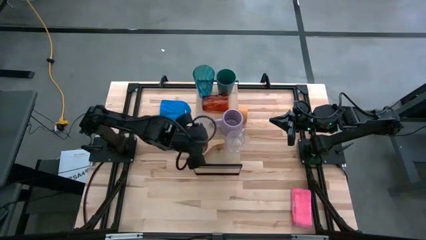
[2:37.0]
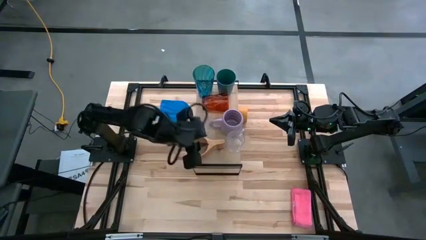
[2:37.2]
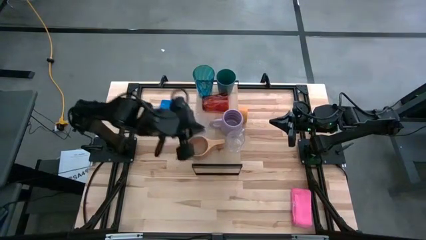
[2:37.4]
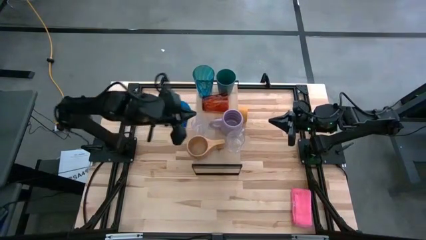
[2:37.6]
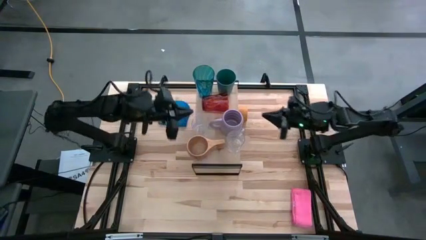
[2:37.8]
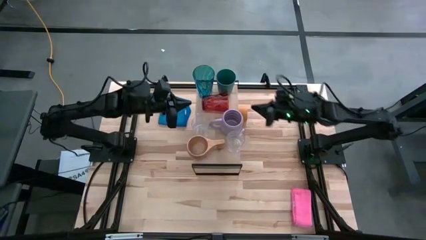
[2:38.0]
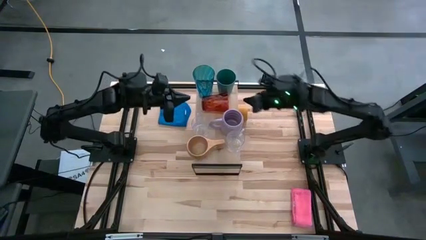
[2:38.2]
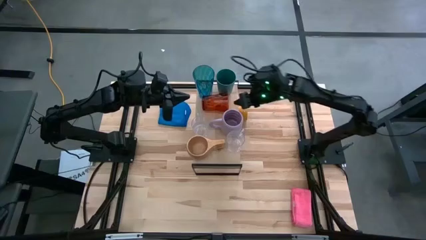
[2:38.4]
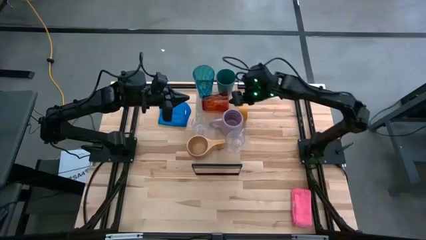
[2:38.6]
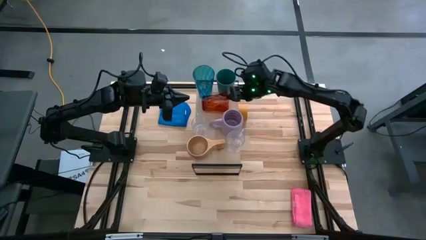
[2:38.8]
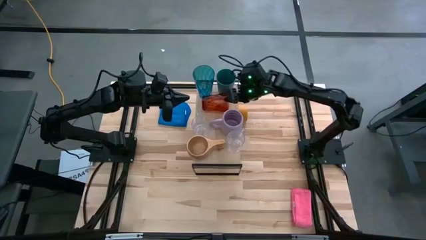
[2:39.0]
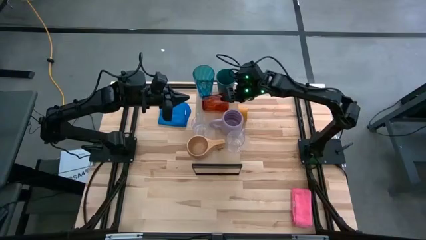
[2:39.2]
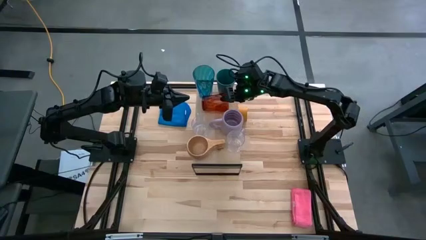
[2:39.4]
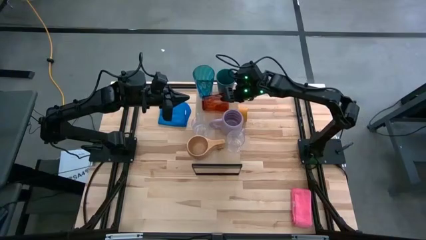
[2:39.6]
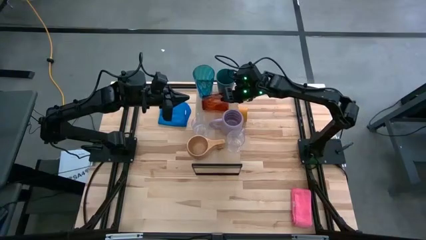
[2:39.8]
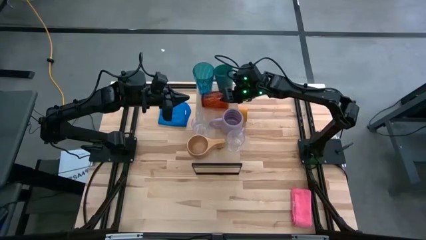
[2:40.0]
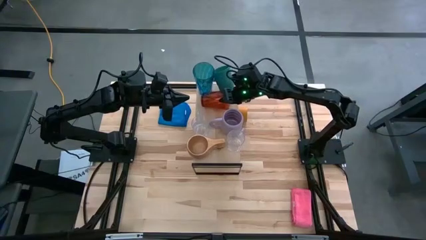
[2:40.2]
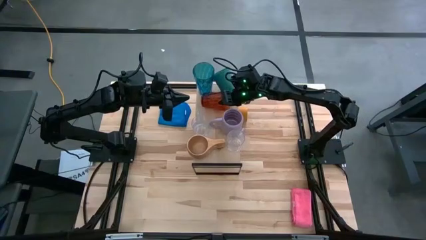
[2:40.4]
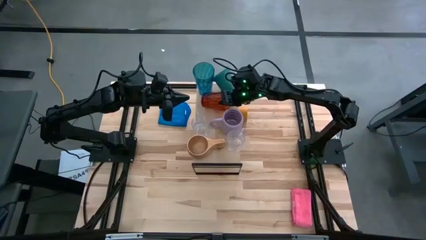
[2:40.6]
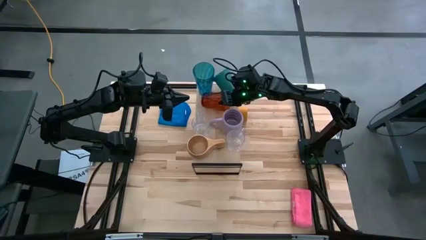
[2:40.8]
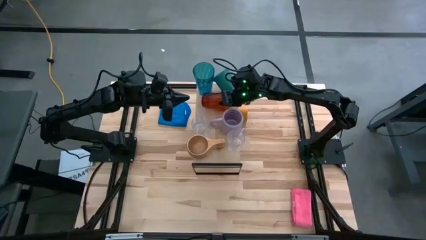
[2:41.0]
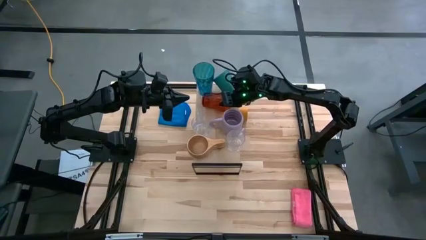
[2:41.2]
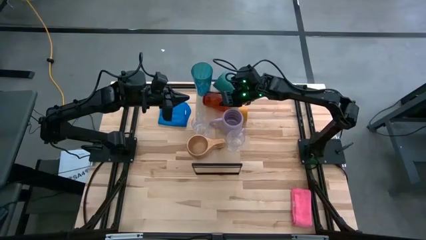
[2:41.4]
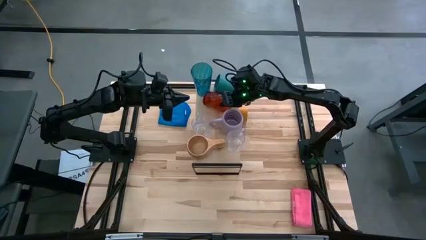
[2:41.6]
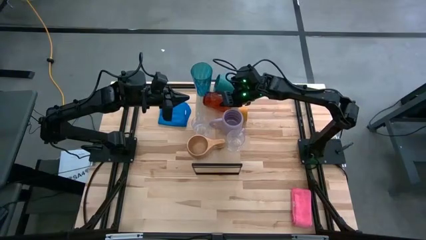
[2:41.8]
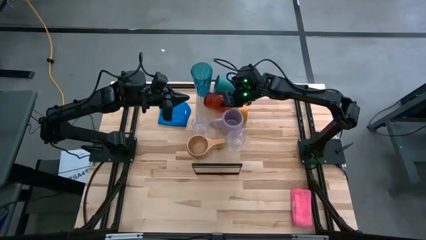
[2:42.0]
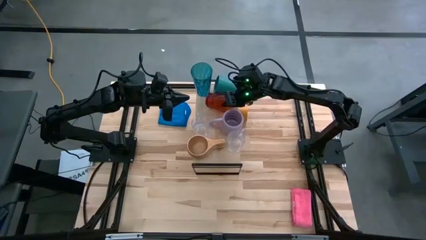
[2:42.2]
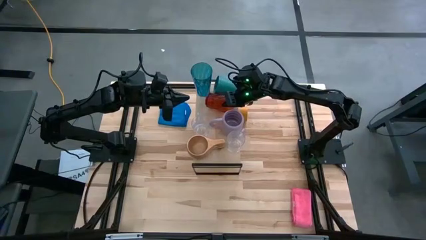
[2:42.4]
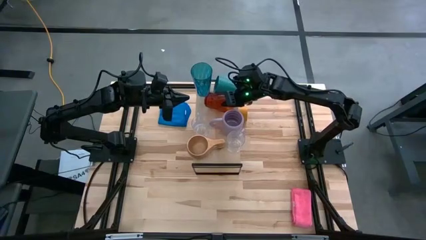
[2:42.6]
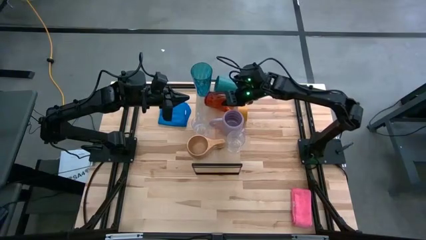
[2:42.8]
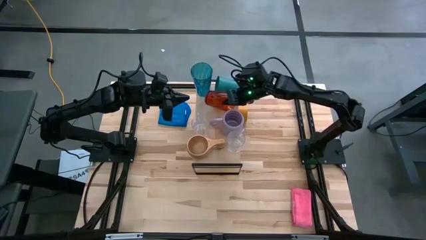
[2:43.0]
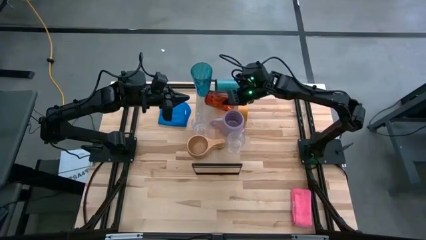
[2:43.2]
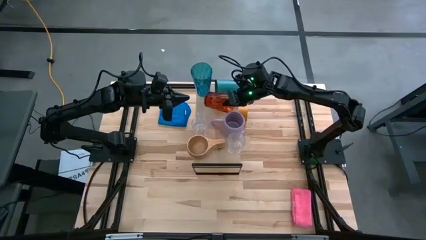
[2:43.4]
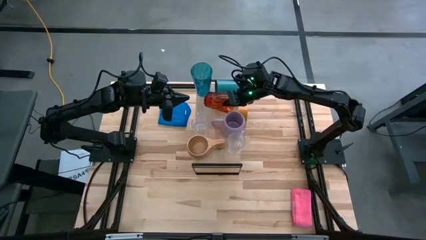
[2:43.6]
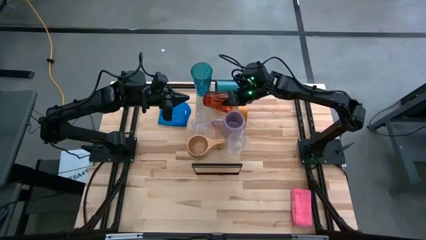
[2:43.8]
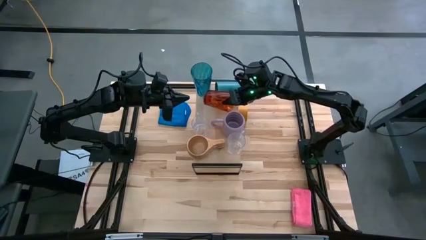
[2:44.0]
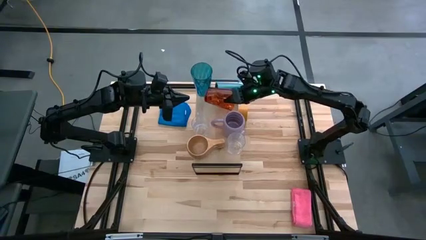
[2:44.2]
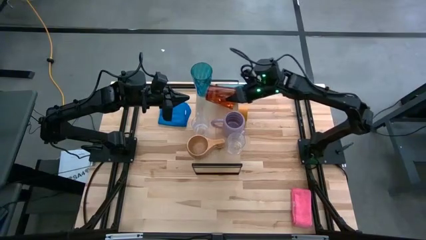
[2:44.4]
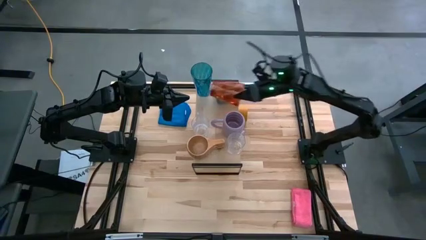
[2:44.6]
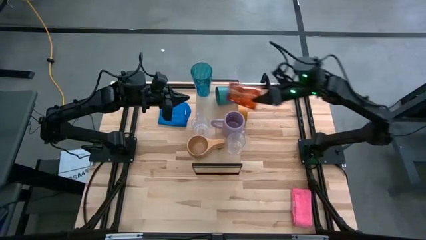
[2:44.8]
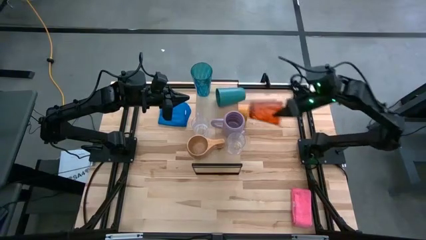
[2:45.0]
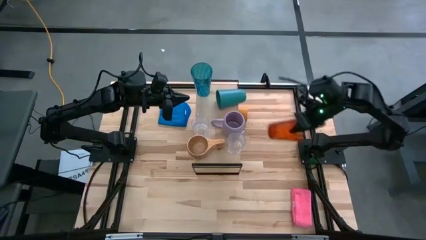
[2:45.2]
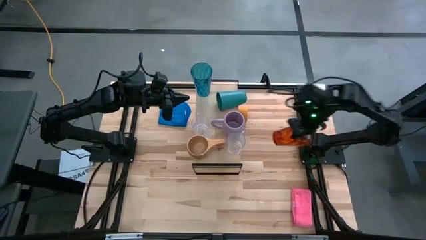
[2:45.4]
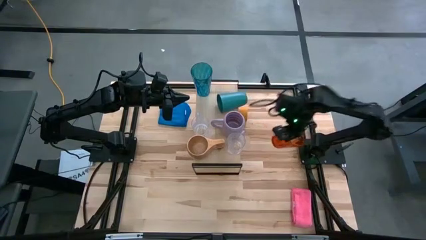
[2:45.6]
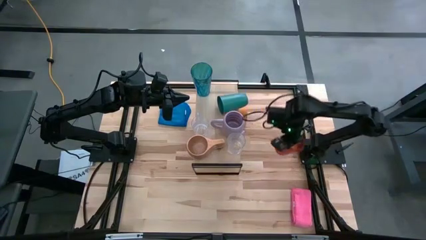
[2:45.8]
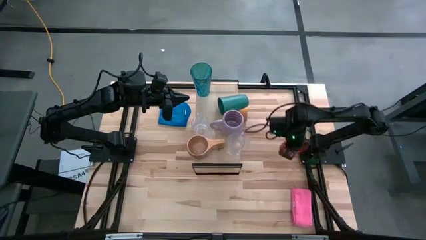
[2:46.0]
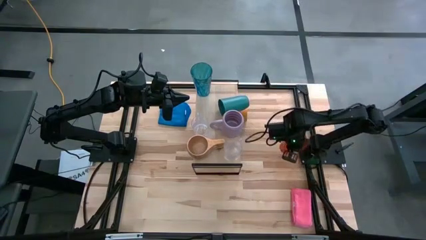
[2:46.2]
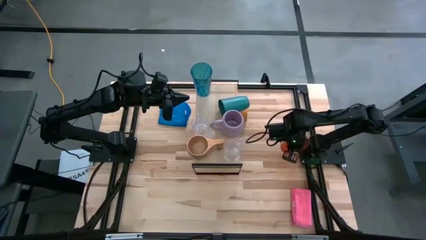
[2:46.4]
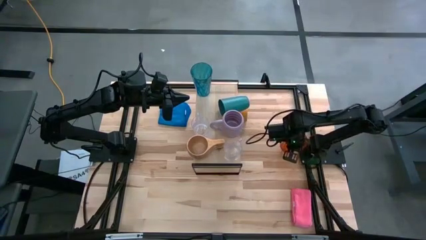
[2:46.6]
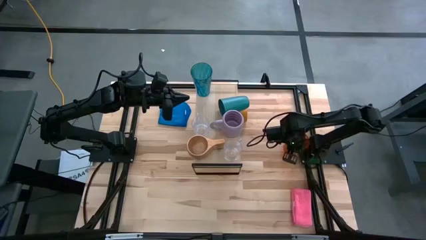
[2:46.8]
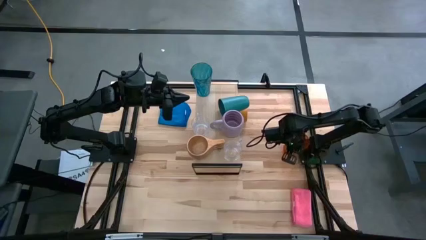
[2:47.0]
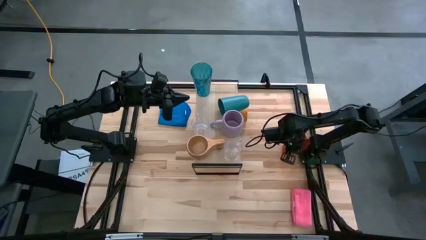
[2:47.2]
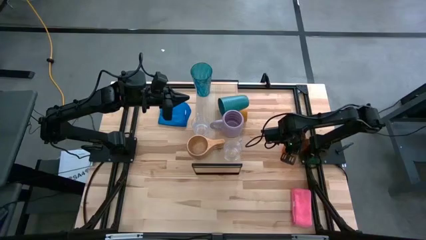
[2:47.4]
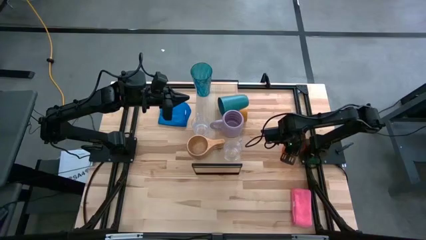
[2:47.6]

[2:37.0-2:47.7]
Task: Stack small to large cups/mugs on shelf
Remove the orange cup from the shelf

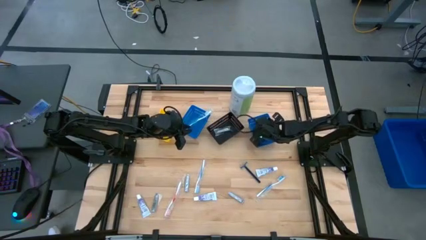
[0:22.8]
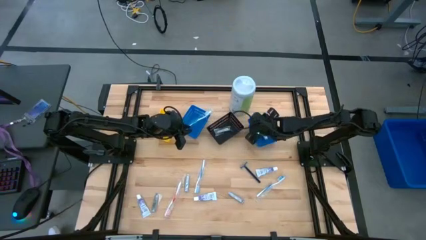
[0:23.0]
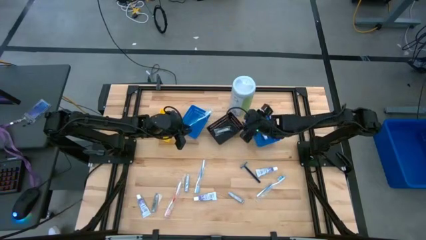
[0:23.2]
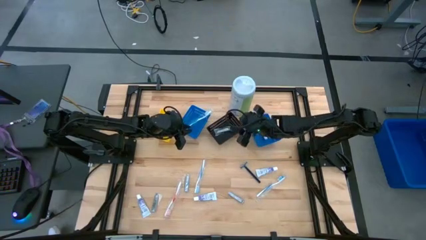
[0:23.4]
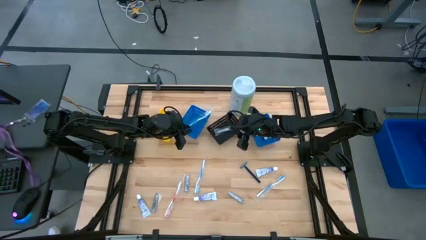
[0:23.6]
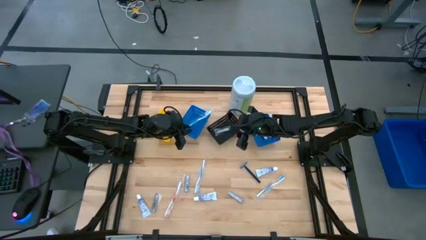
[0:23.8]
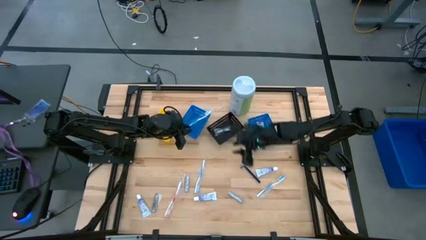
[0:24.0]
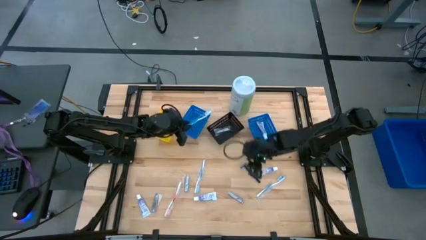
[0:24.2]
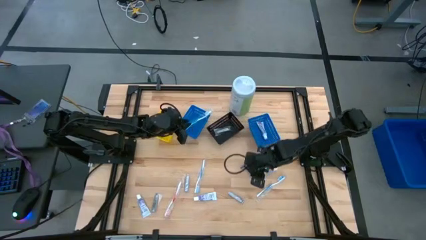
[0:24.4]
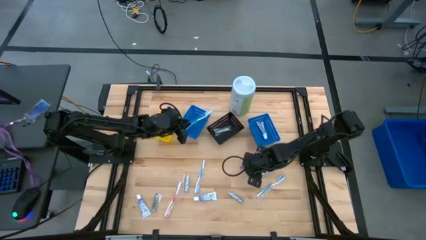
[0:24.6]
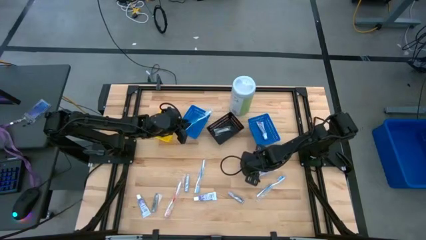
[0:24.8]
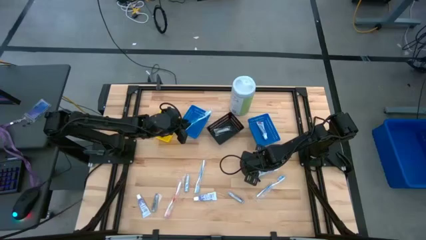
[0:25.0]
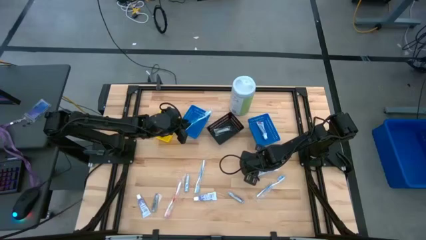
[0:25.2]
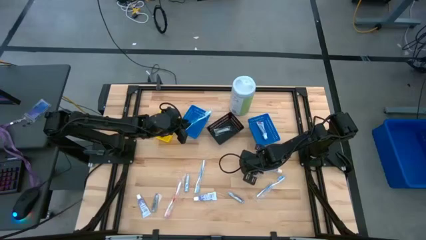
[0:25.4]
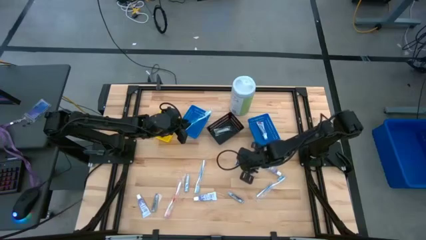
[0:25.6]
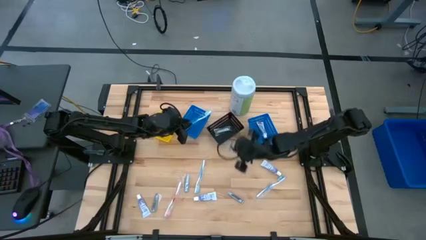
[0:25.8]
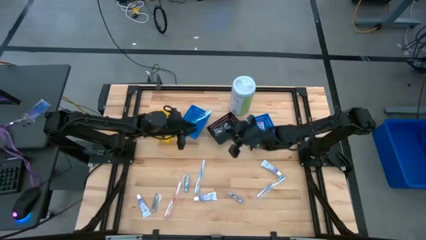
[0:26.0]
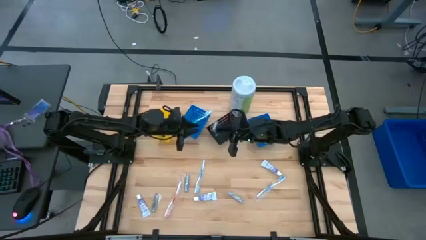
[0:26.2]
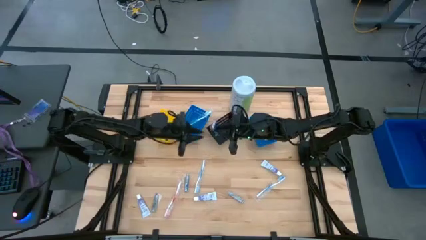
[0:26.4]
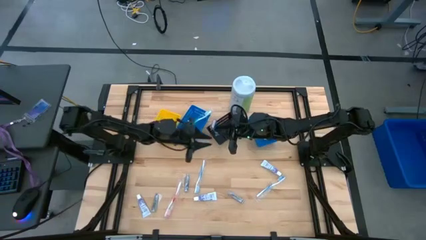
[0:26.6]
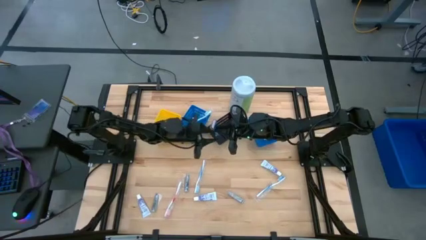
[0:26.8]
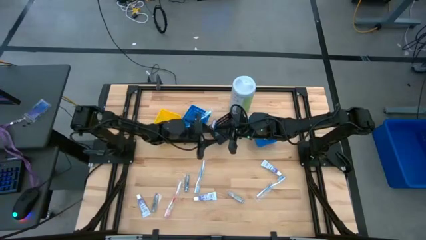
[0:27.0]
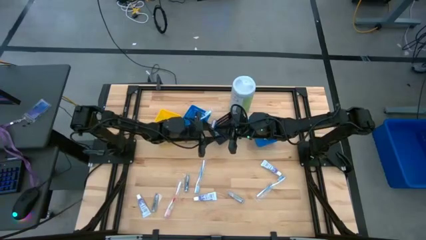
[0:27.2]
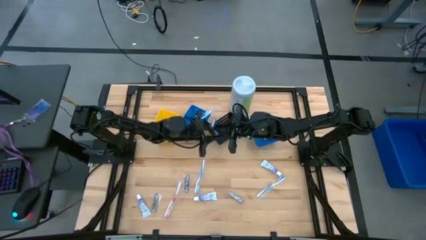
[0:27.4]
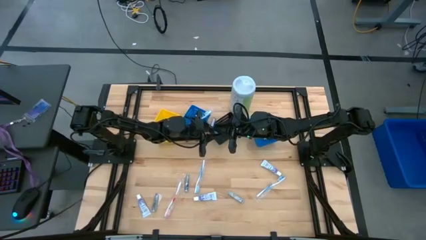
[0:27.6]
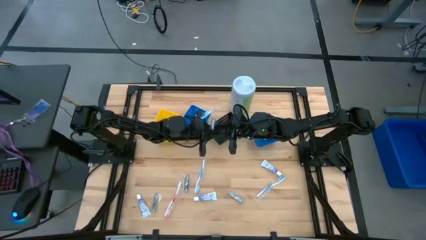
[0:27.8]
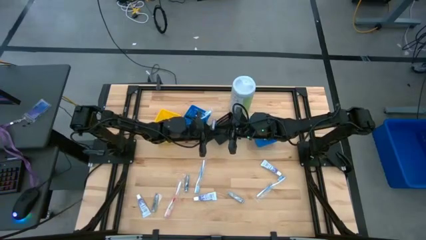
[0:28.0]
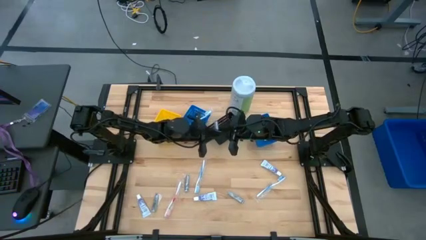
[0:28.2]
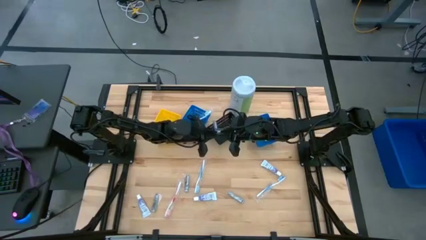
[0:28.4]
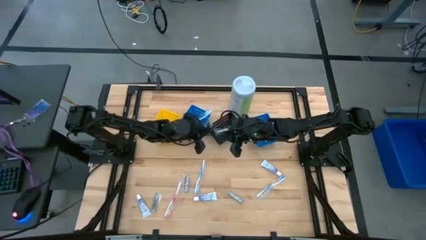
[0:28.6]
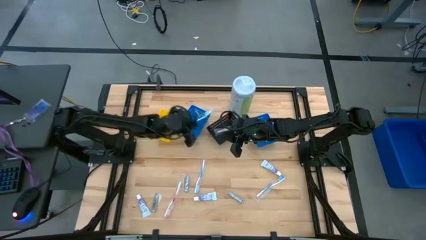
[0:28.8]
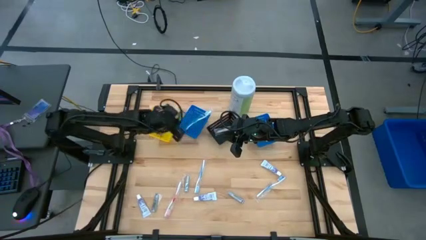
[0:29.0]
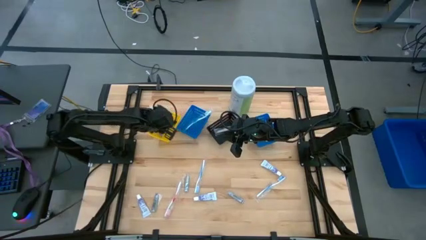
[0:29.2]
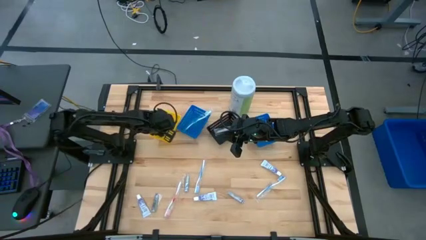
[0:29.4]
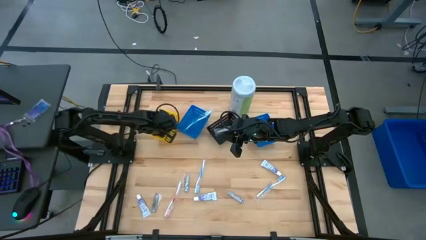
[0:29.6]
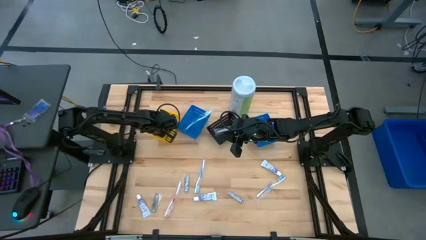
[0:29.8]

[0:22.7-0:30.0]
Task: Pick & Place Travel size toiletries
Put the blue razor into the yellow basket
